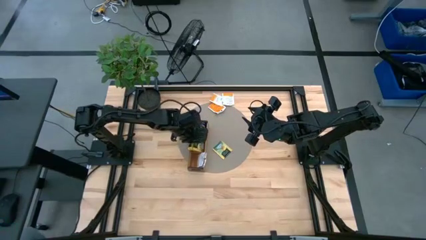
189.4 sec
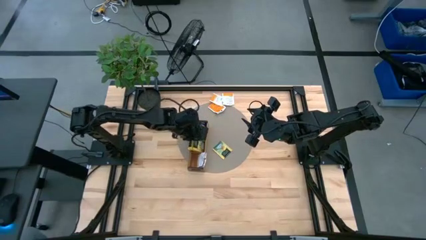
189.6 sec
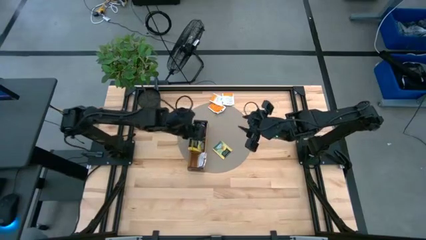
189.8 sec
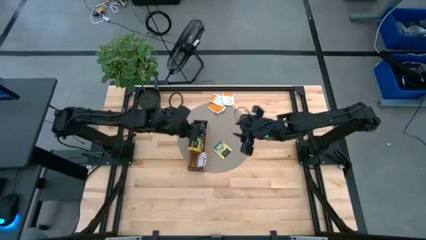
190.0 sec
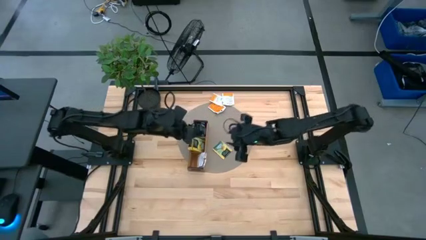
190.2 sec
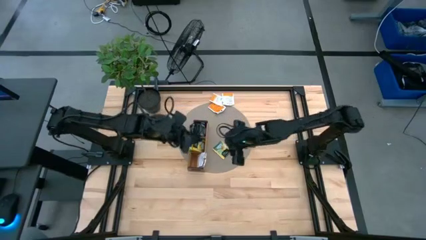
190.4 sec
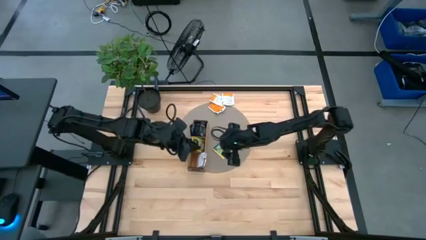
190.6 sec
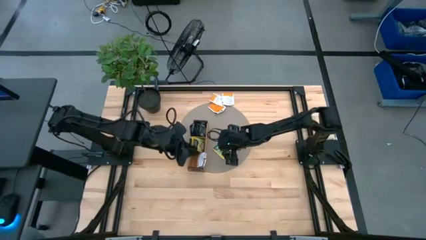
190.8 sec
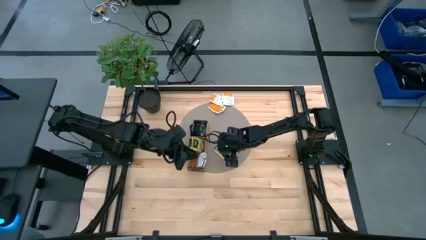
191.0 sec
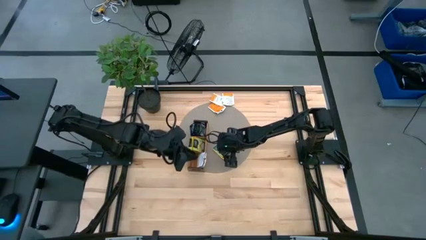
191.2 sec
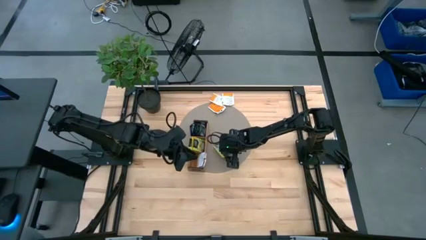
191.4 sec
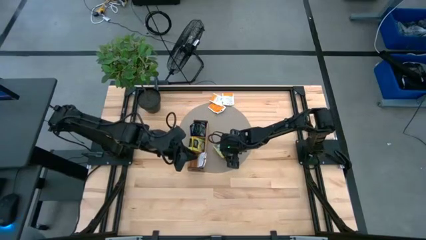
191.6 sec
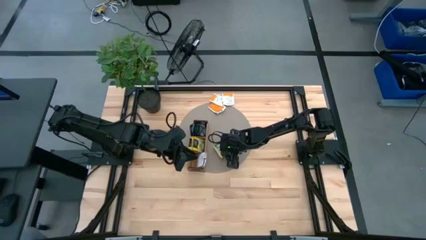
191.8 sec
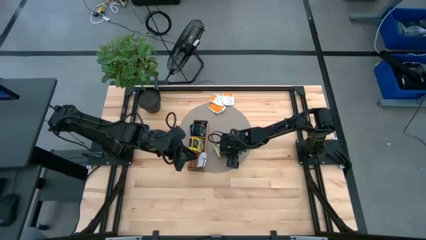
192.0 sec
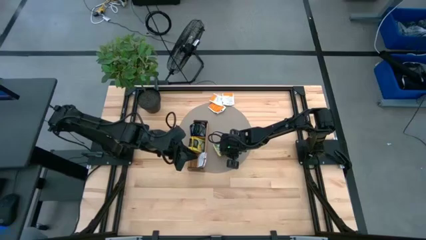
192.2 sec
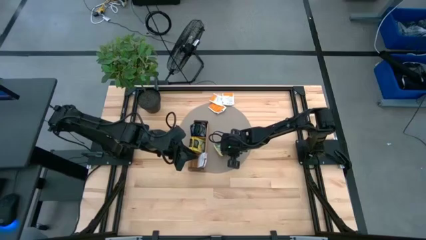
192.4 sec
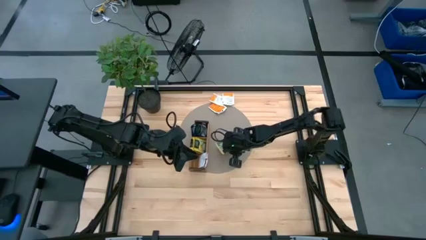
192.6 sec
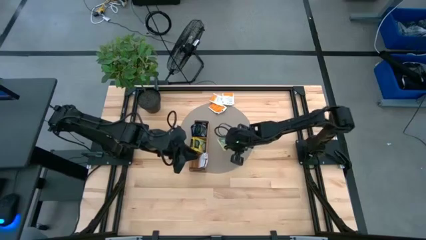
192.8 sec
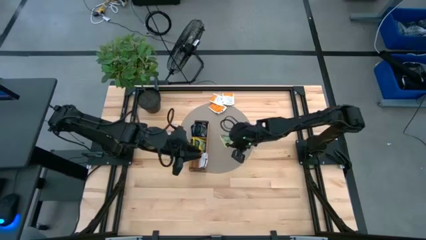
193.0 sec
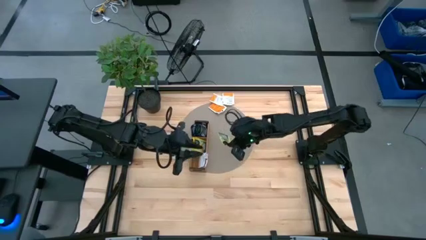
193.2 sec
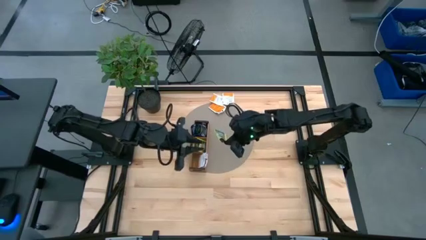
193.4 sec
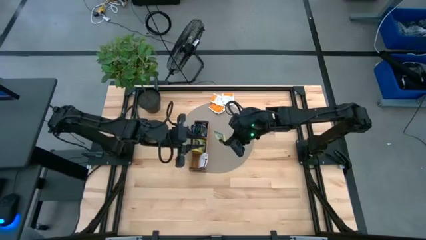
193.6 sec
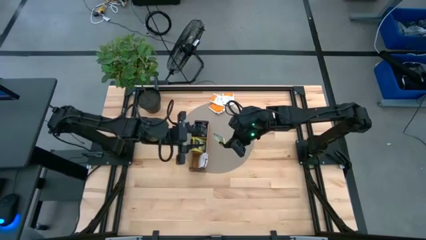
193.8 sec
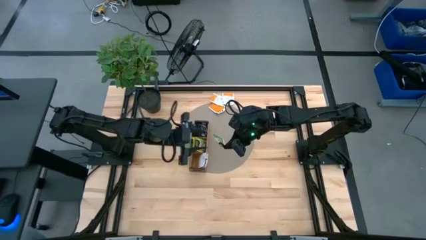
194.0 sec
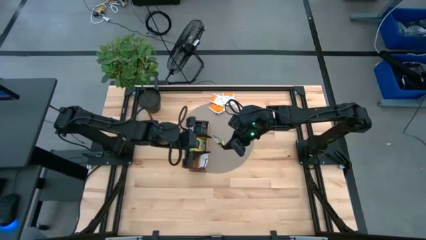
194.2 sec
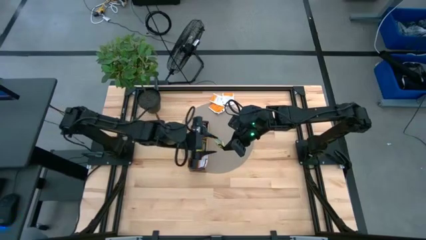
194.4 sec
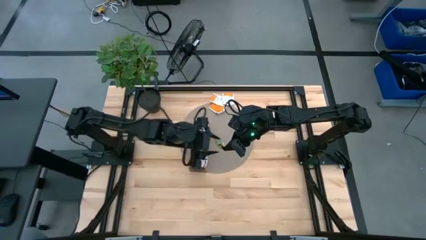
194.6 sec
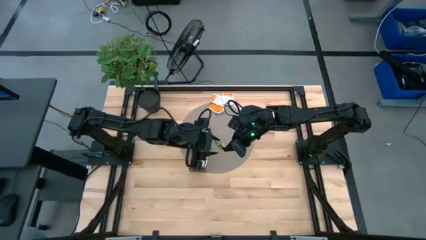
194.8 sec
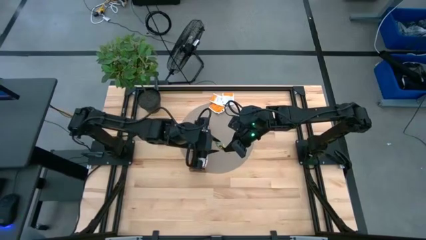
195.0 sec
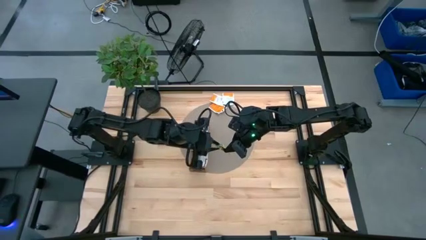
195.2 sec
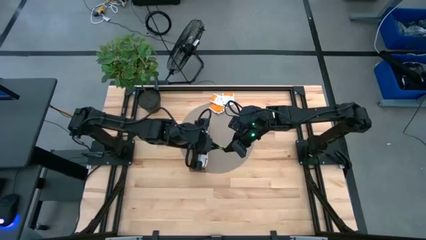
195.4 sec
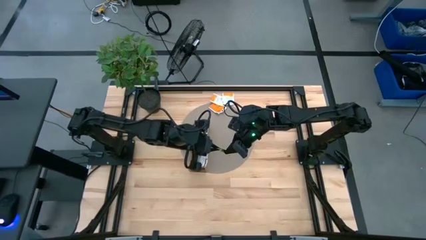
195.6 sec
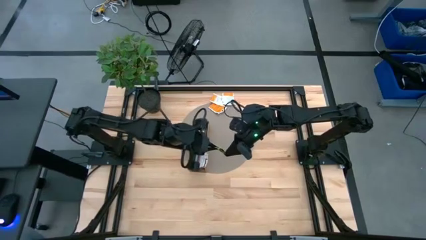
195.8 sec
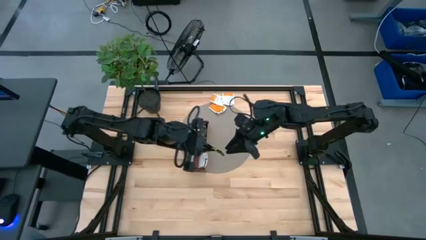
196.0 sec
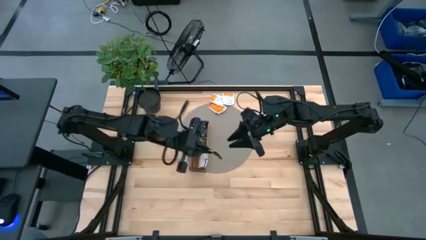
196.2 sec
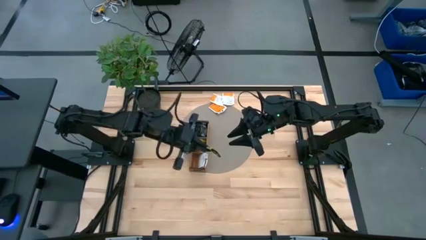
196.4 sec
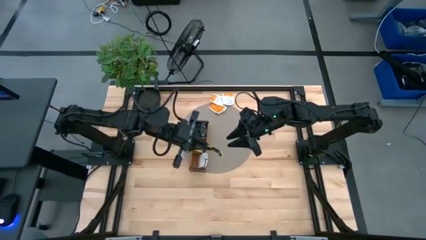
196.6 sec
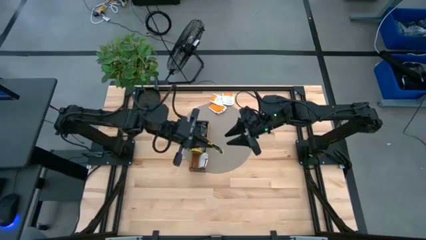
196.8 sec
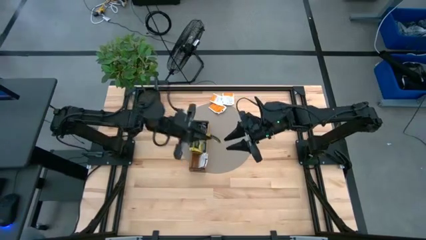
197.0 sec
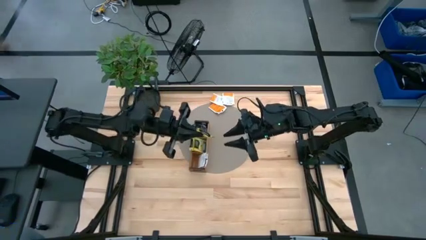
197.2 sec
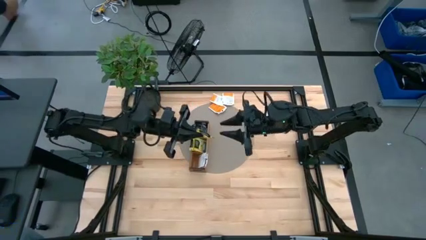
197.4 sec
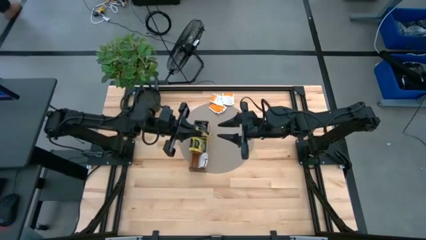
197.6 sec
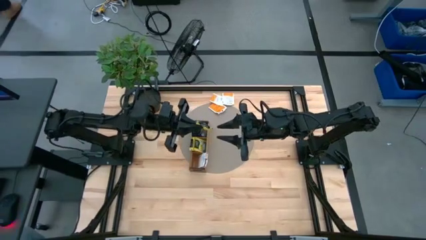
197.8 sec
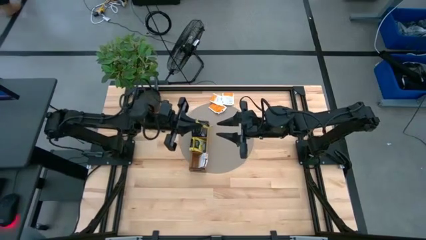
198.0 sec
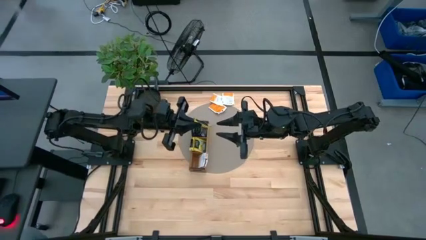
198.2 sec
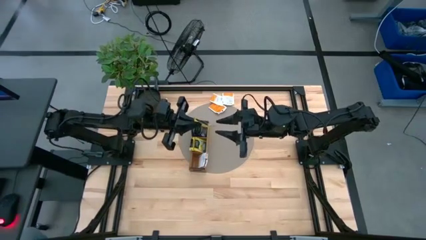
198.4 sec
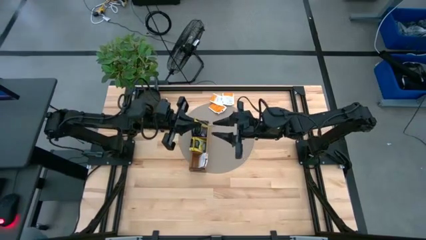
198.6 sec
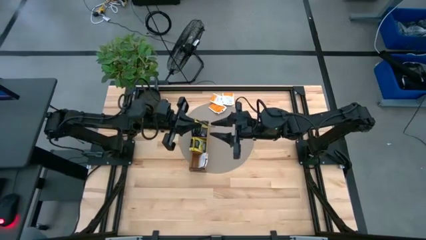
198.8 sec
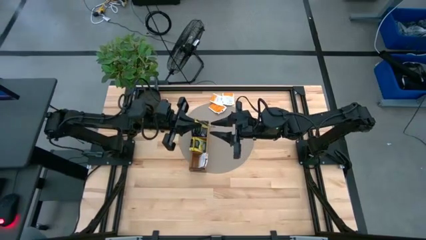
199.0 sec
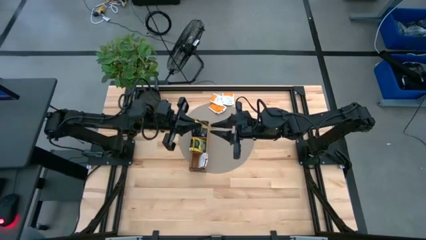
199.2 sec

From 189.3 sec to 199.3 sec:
Task: Pick & Place Tea
Put the yellow tea bag into the middle section of the wooden organizer
